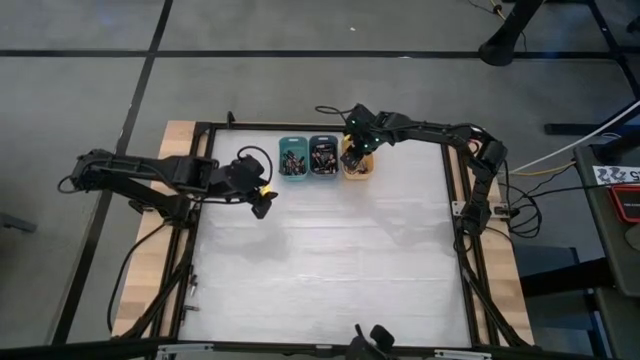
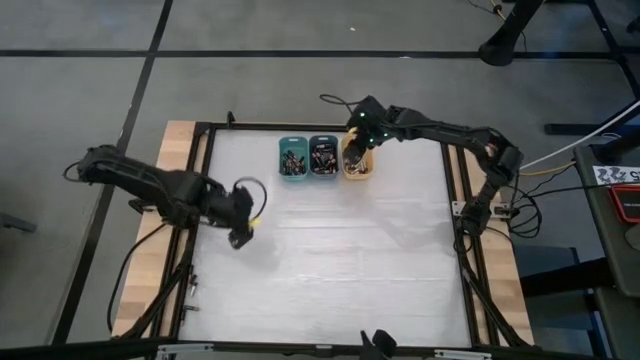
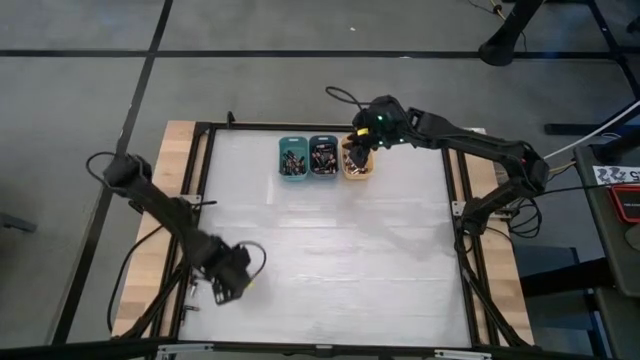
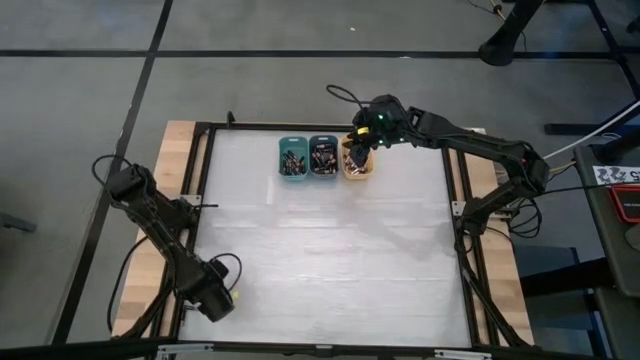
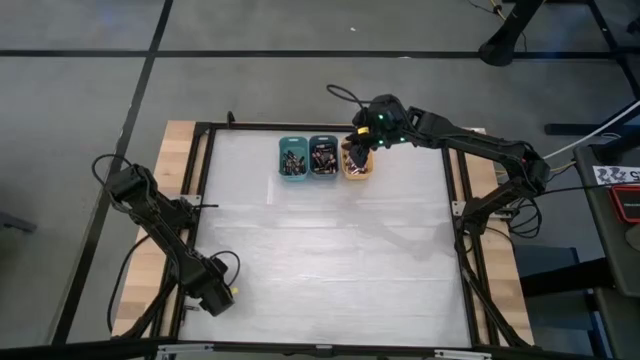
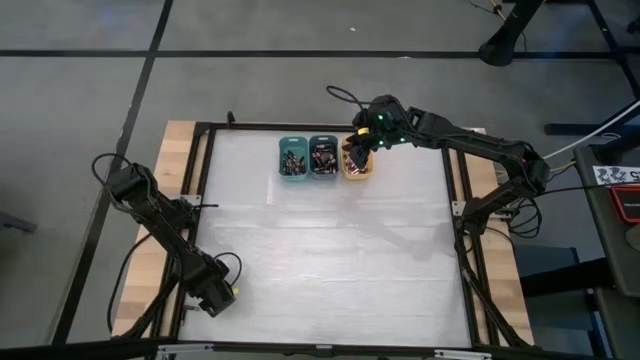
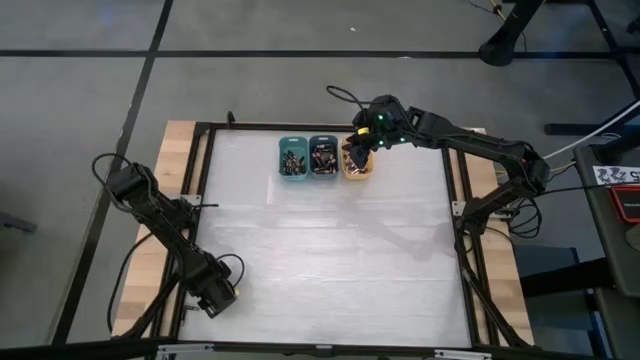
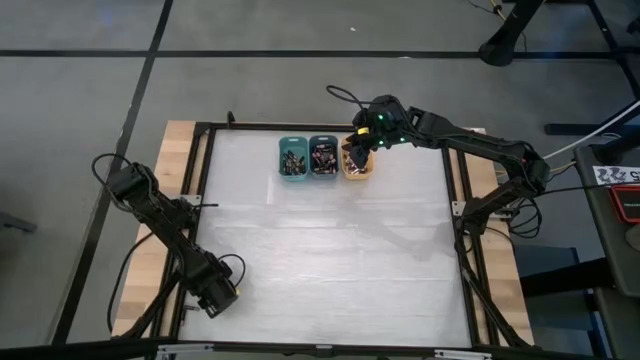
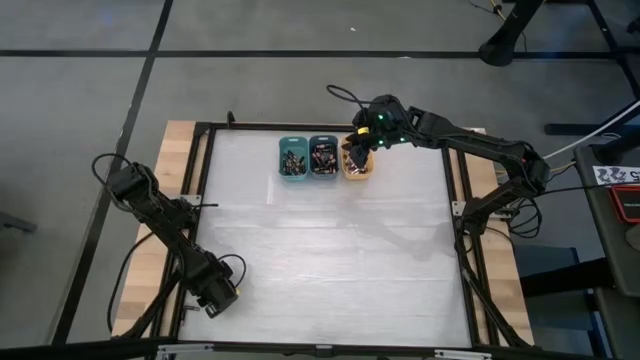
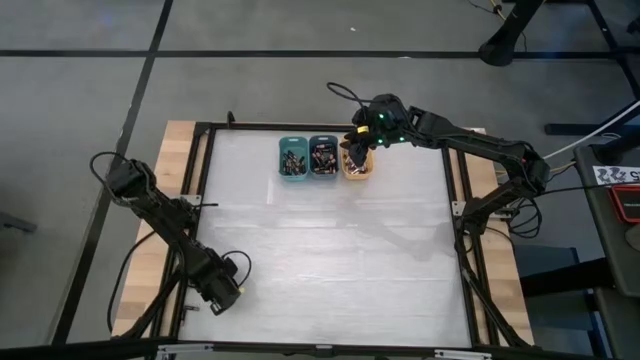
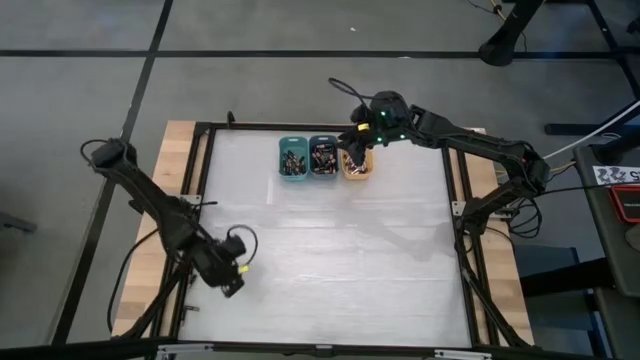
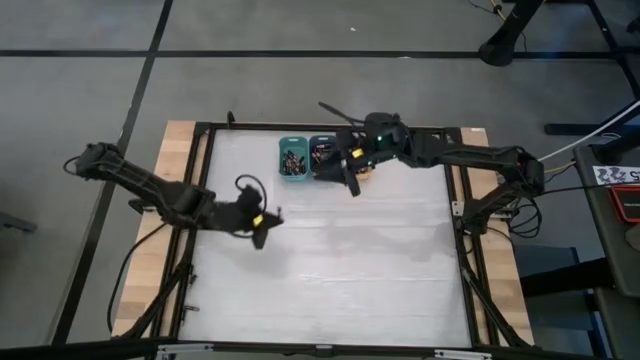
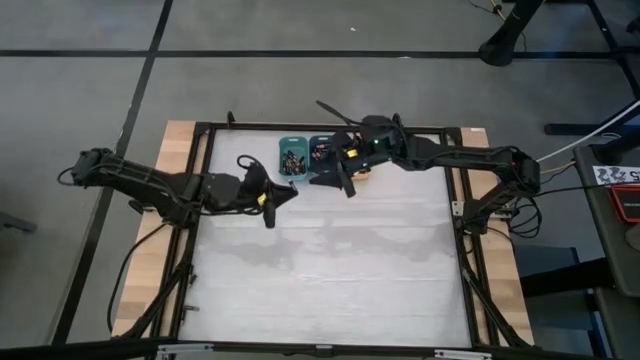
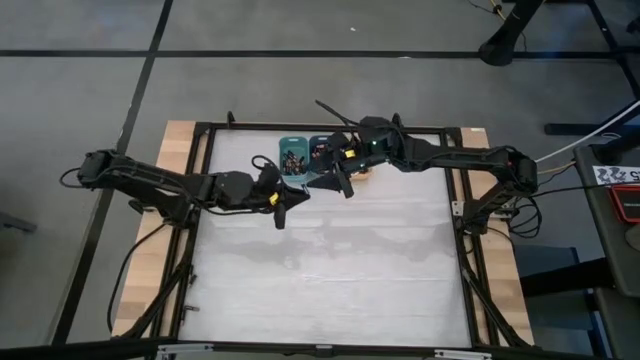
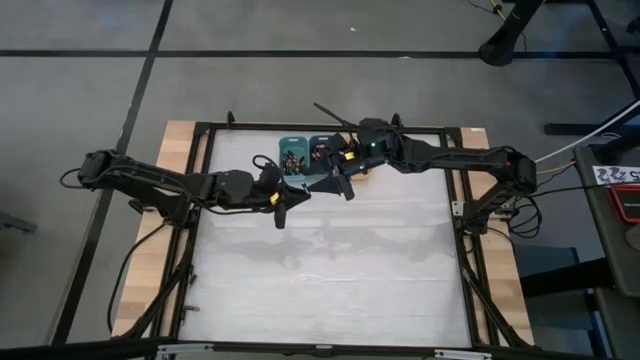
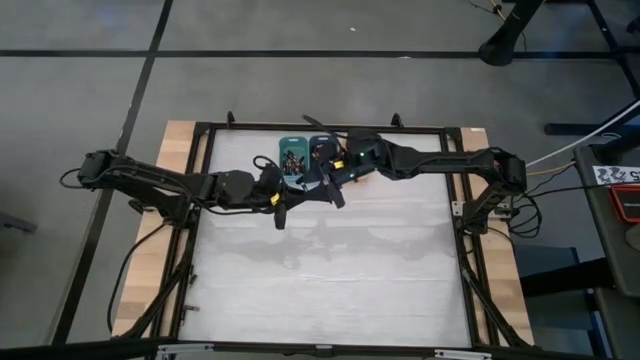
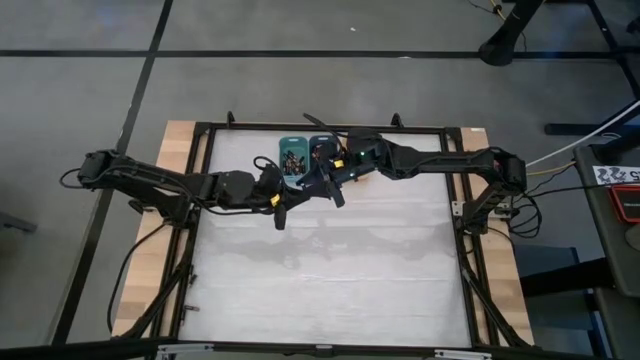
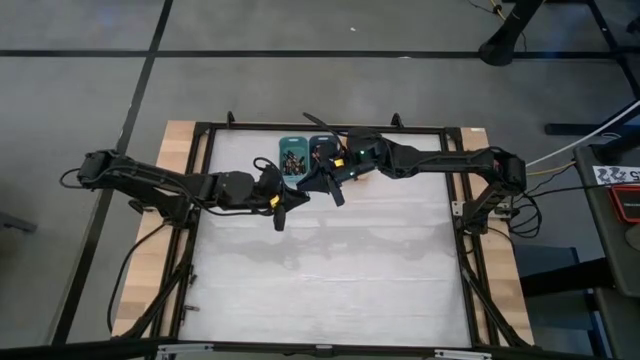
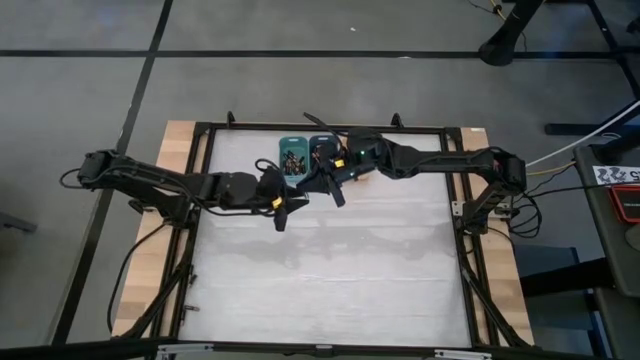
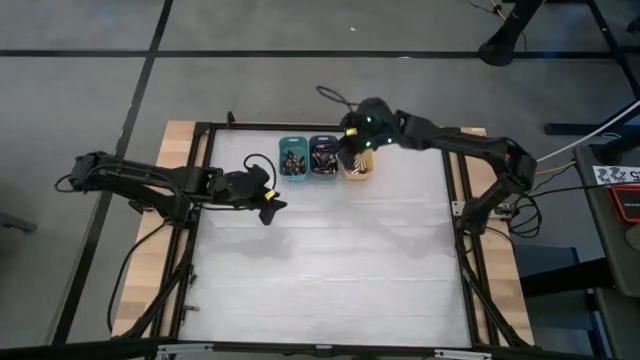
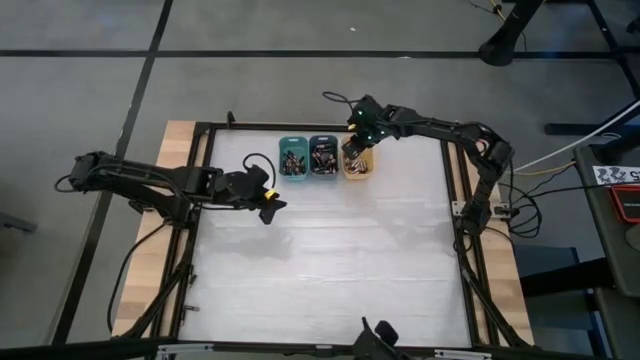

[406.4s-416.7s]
Task: Sort batteries
Put the silver battery into the yellow bin

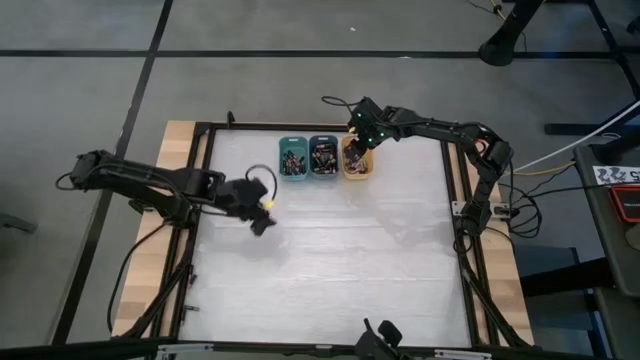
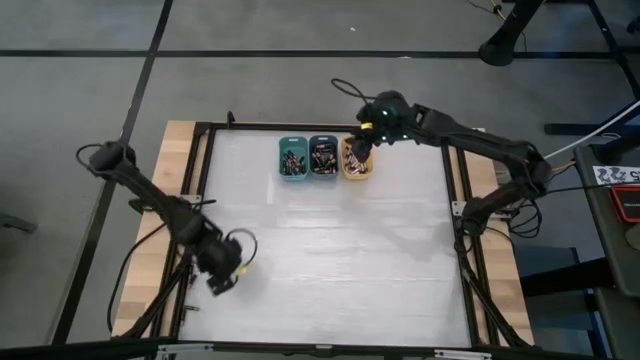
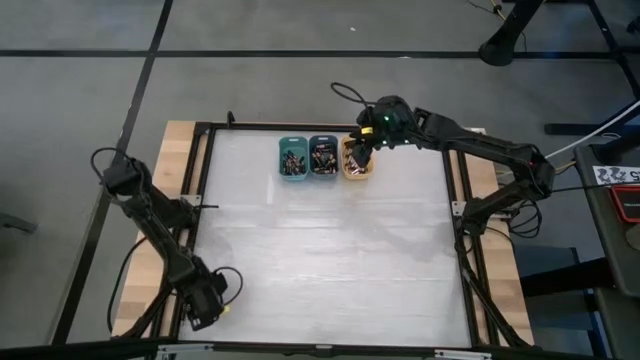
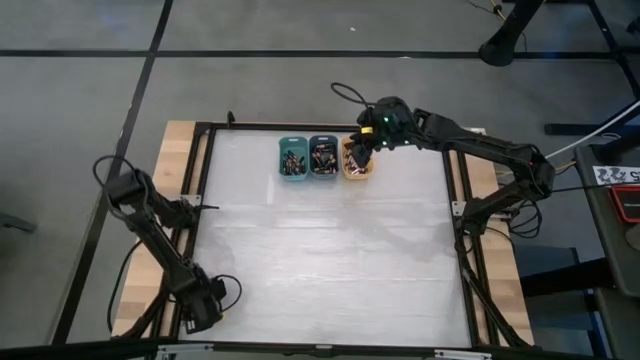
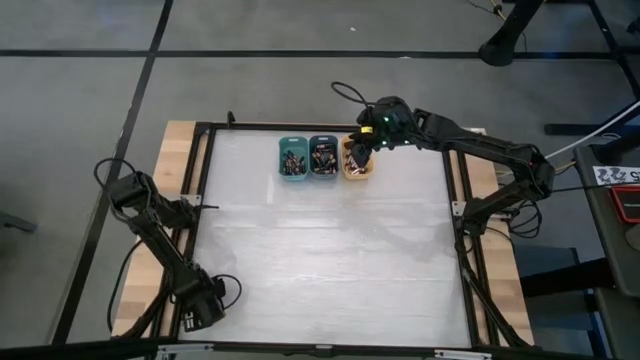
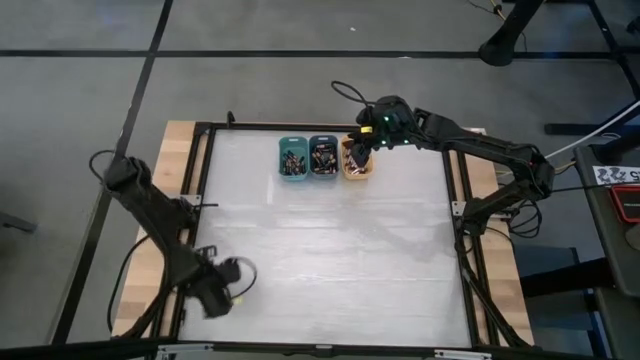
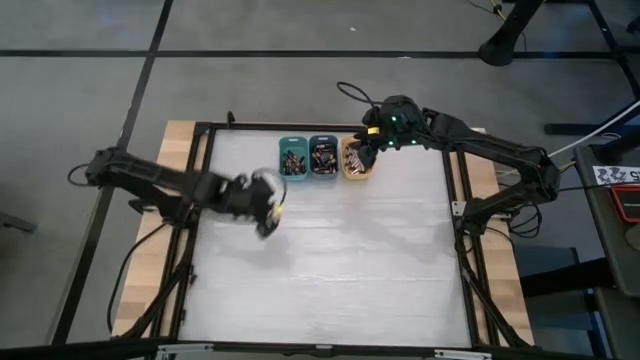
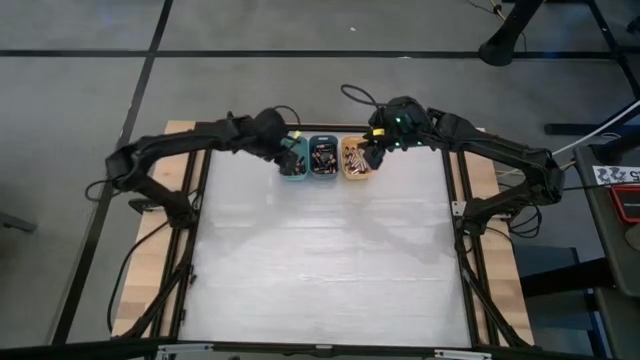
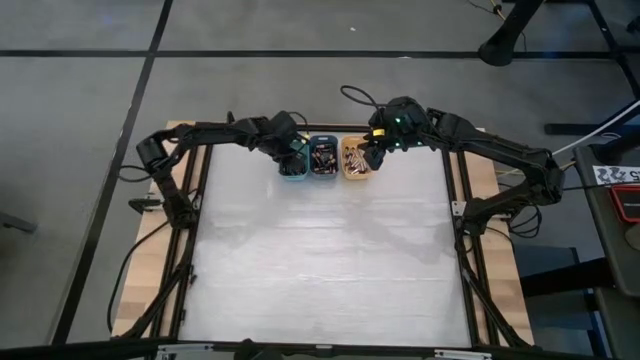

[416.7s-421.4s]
Put the brown battery into the green bin

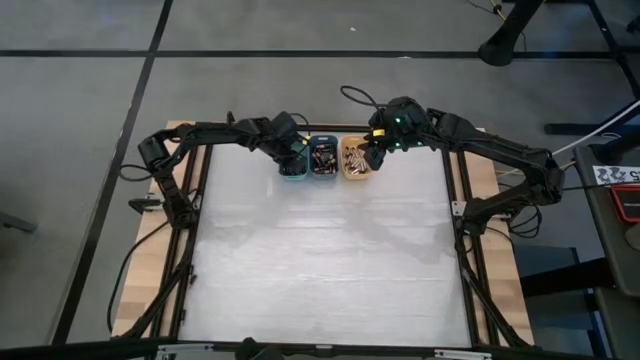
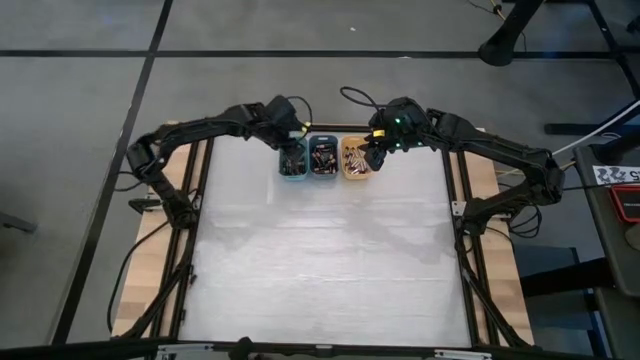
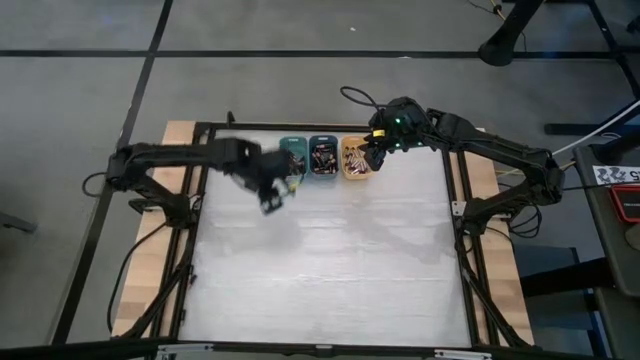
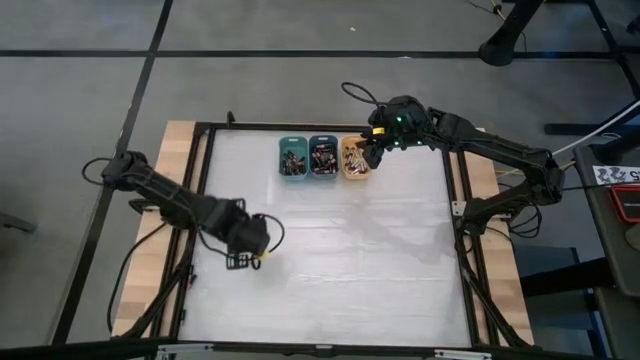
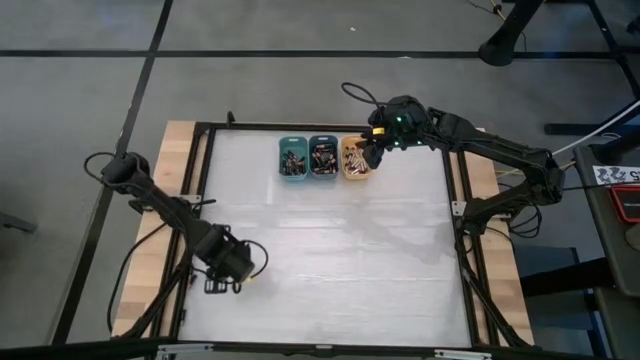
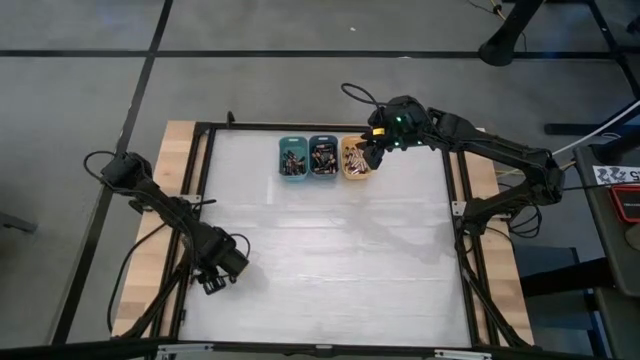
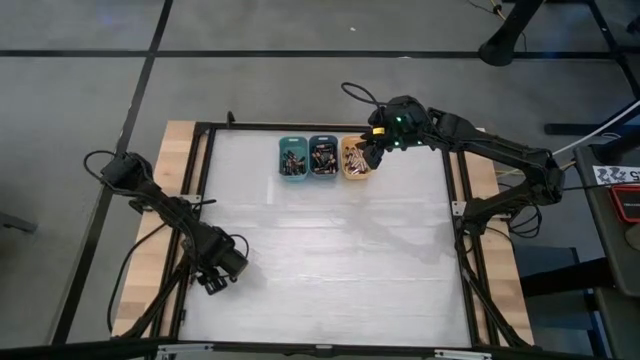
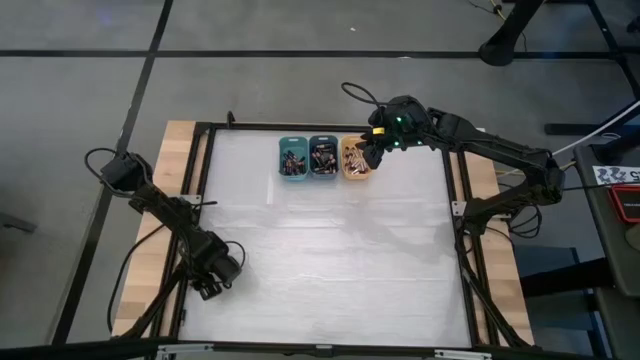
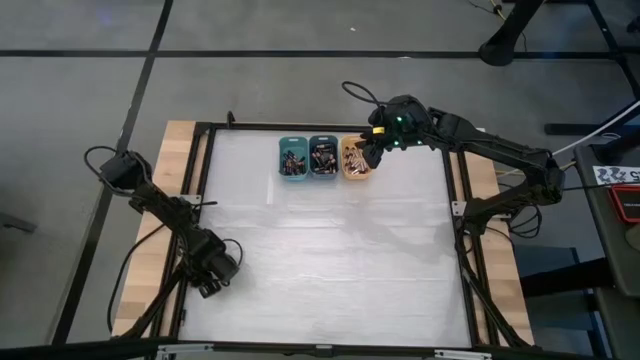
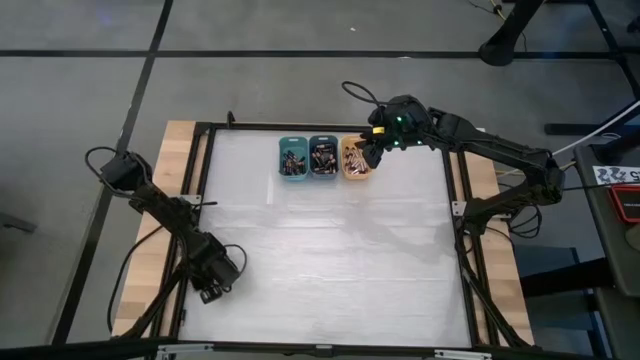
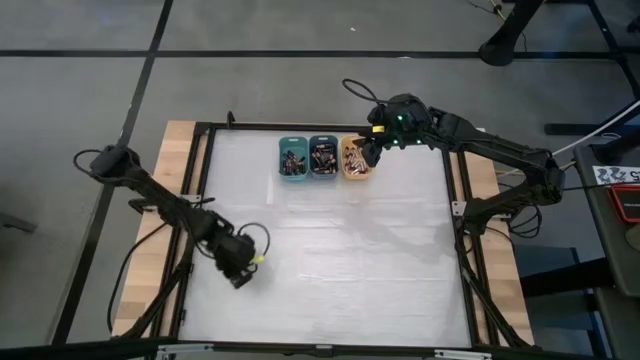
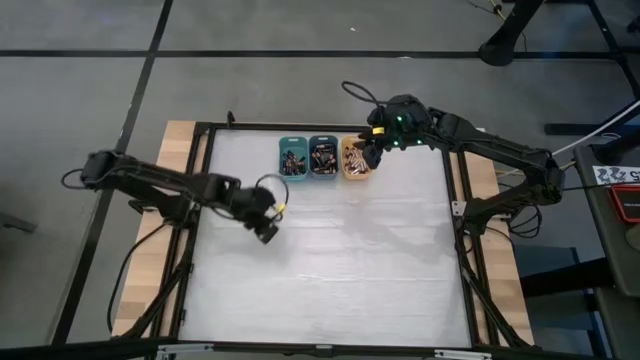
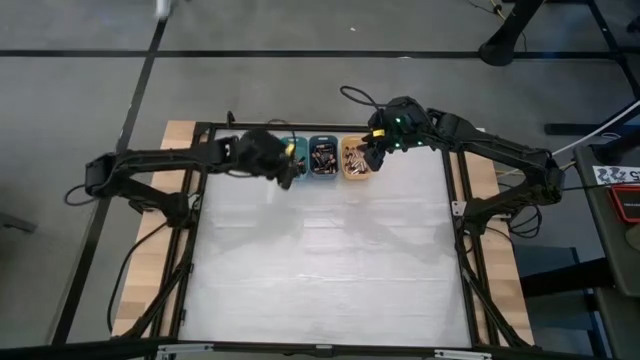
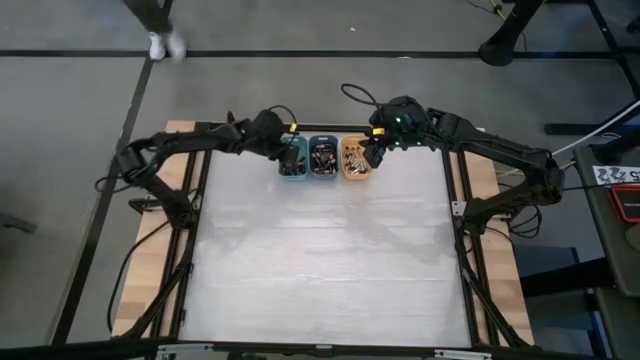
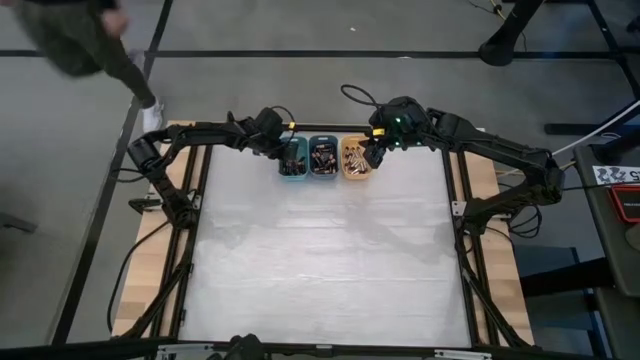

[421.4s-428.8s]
Put the brown battery into the green bin
